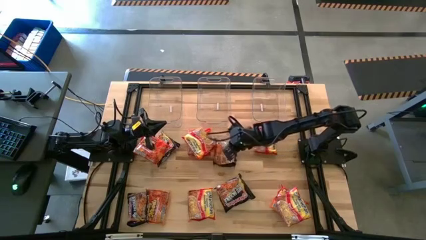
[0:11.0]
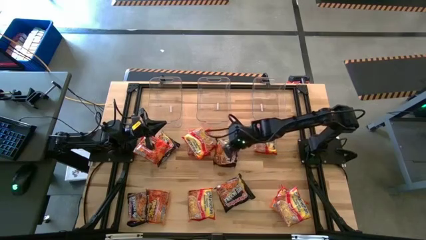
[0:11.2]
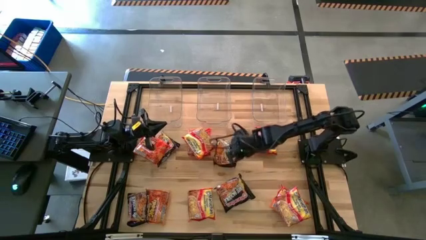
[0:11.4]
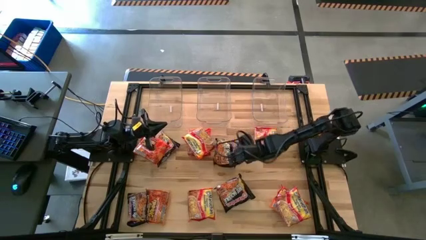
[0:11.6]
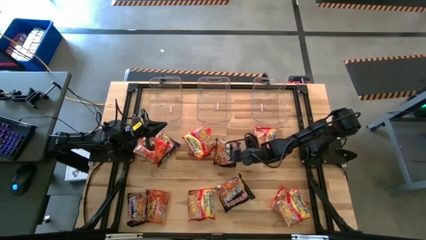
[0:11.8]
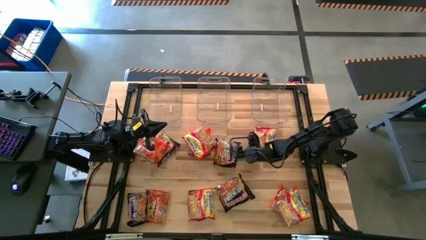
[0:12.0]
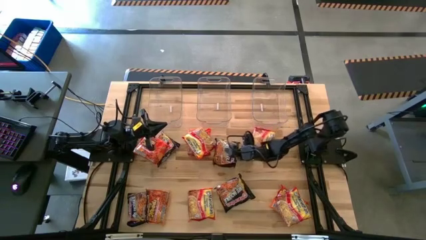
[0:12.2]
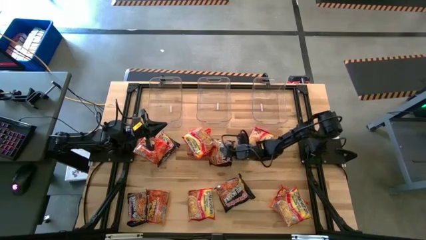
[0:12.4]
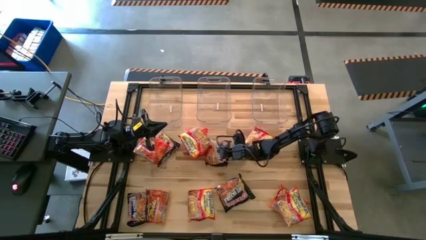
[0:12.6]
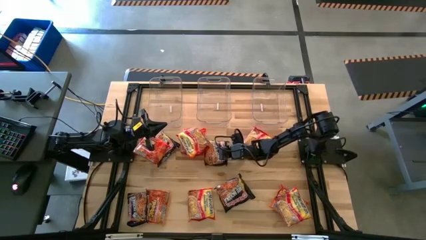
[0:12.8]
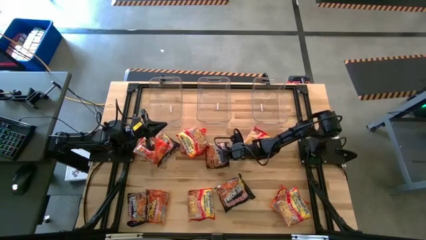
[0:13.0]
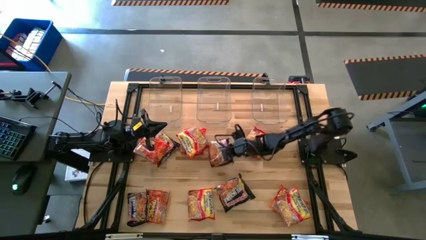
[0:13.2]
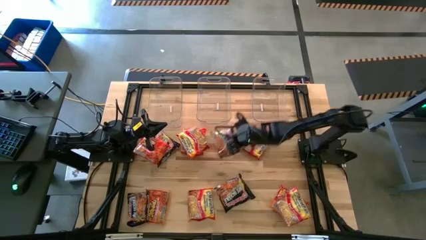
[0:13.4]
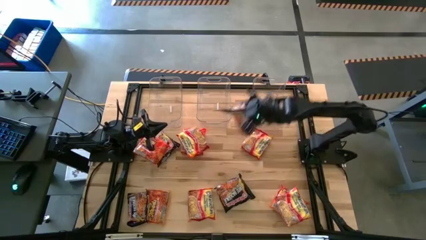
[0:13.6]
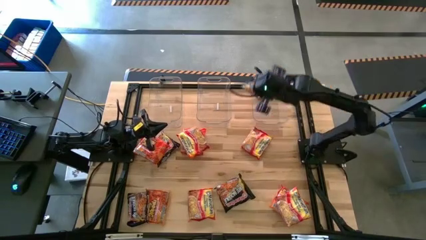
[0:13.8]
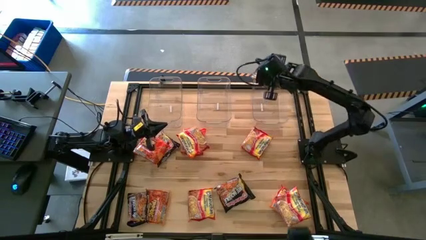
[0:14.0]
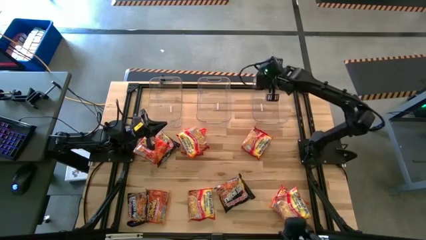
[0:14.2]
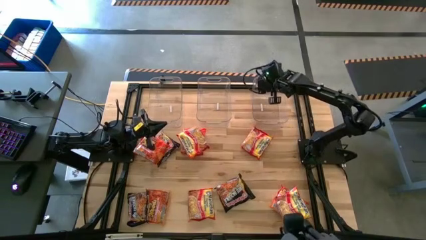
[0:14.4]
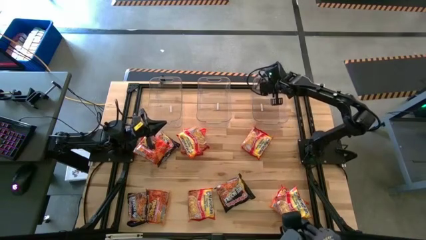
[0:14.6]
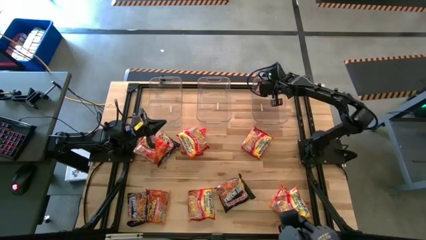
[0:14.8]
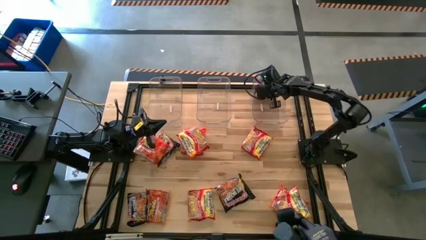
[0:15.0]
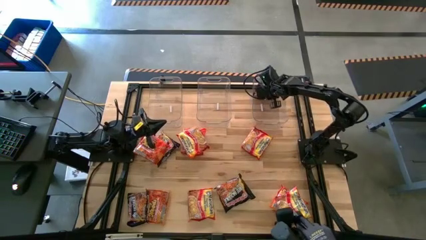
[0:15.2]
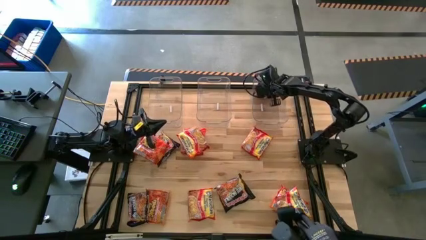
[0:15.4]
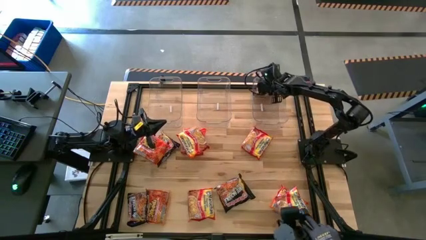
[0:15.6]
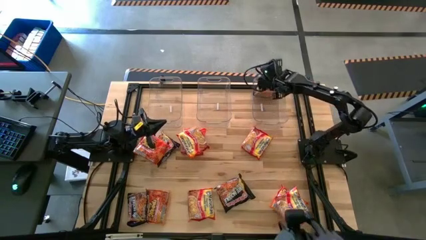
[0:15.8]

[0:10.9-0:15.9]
Task: Sort Maruchan noodles
Put the black noodle packs into the right transparent bin

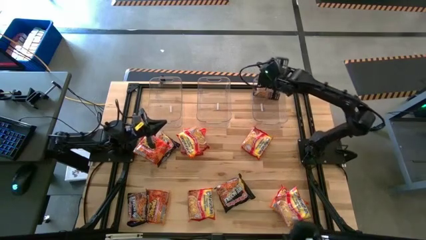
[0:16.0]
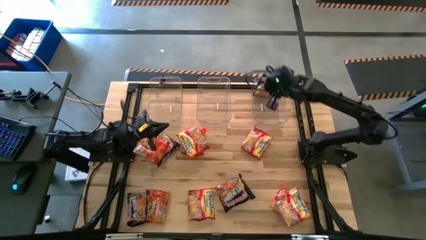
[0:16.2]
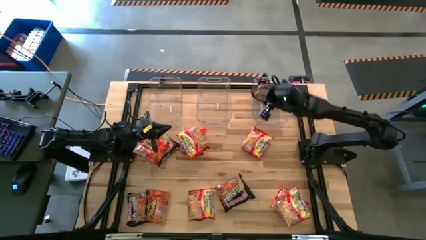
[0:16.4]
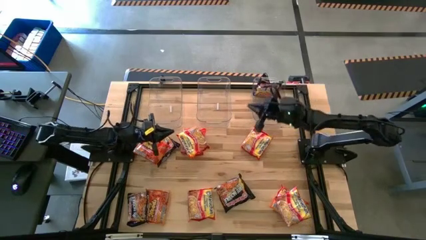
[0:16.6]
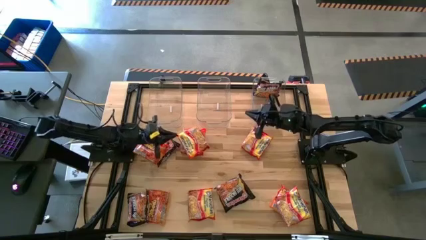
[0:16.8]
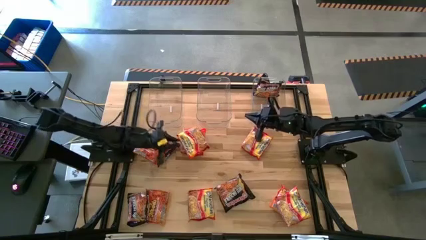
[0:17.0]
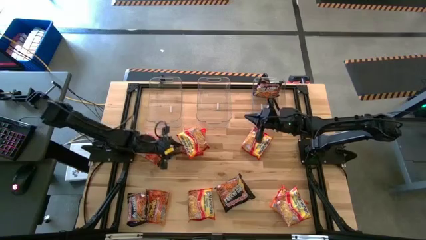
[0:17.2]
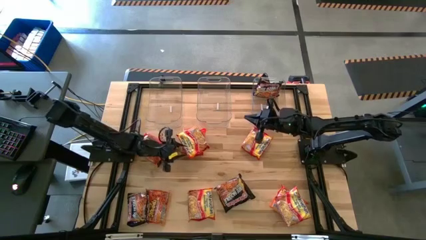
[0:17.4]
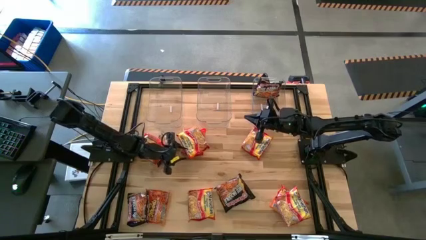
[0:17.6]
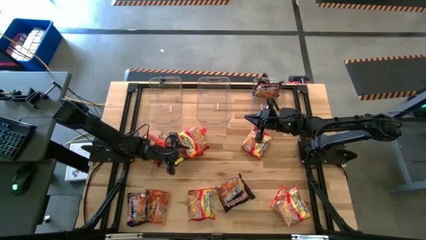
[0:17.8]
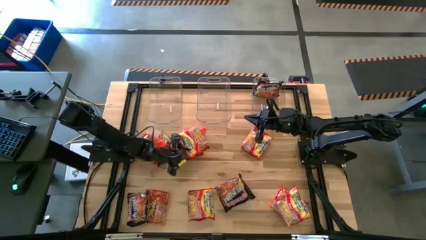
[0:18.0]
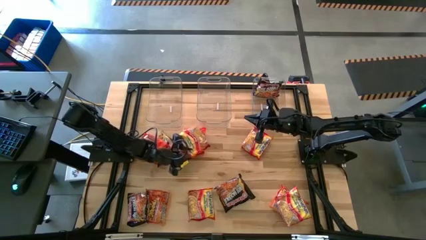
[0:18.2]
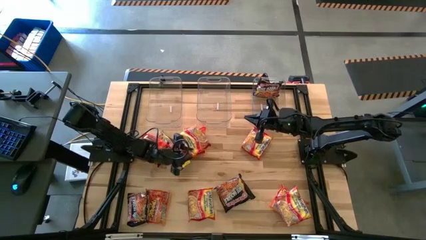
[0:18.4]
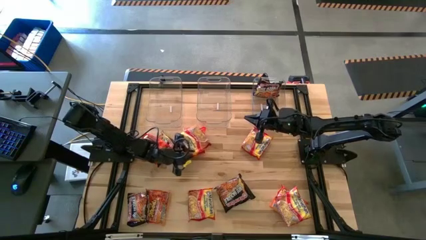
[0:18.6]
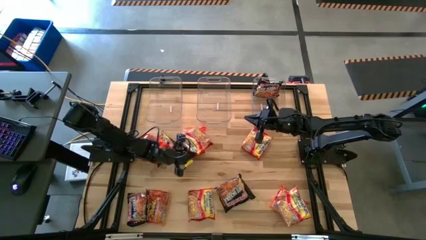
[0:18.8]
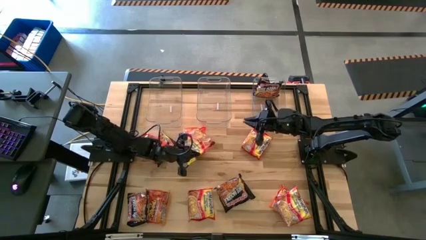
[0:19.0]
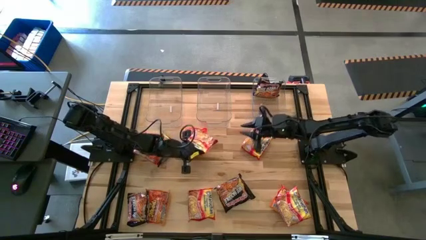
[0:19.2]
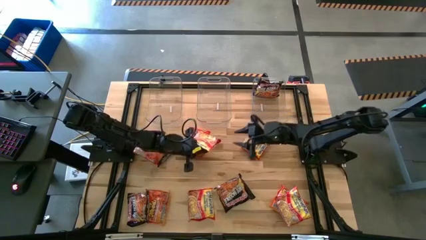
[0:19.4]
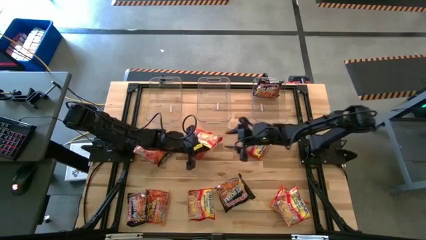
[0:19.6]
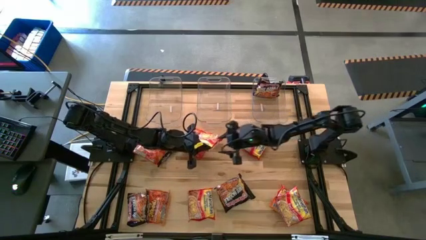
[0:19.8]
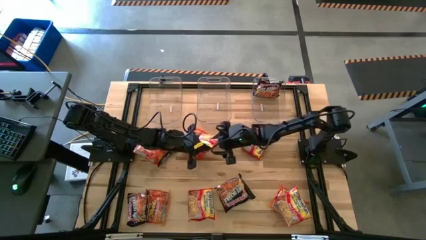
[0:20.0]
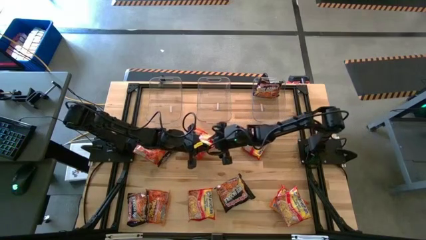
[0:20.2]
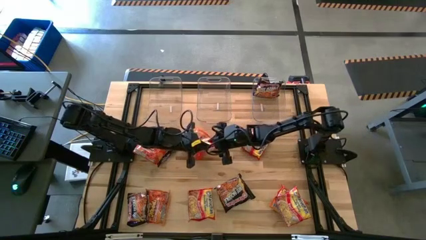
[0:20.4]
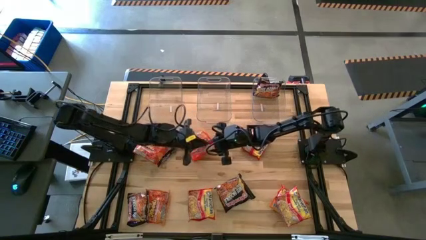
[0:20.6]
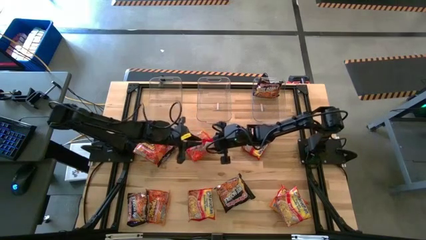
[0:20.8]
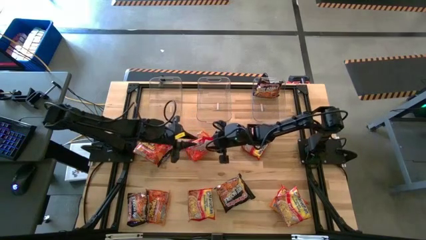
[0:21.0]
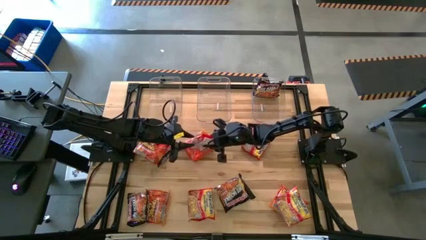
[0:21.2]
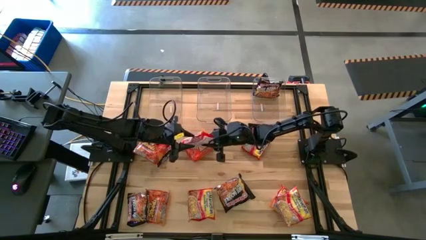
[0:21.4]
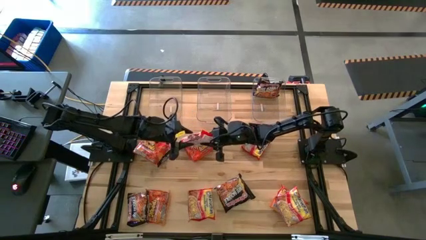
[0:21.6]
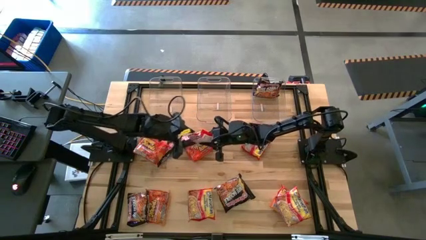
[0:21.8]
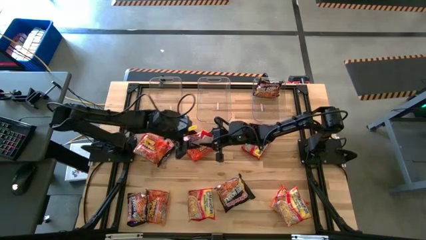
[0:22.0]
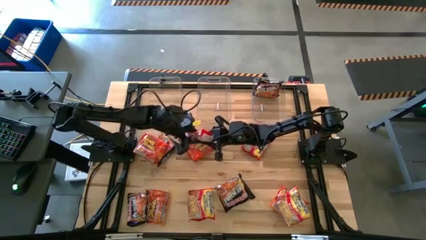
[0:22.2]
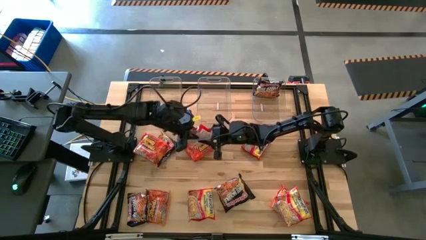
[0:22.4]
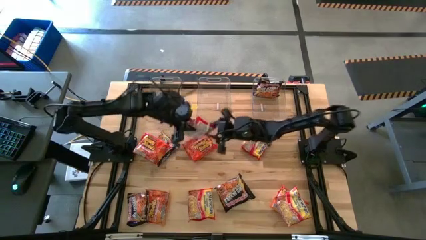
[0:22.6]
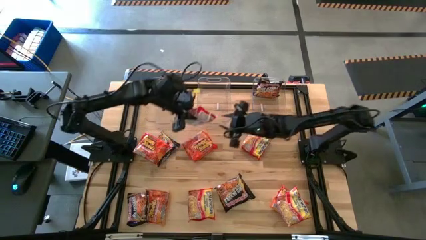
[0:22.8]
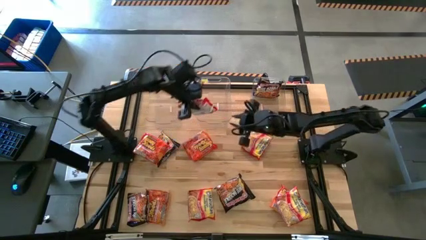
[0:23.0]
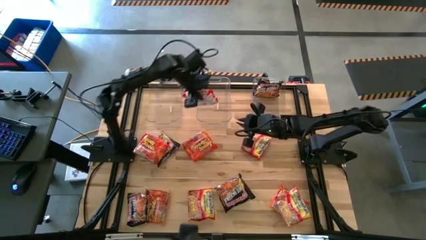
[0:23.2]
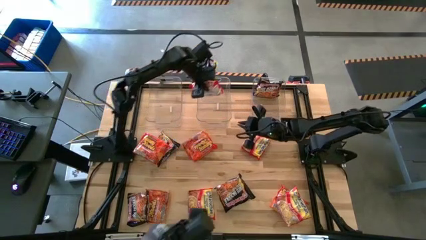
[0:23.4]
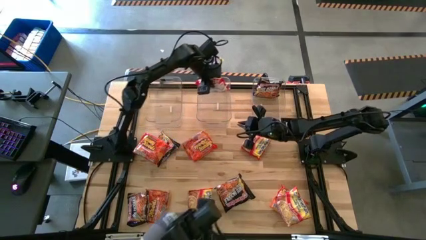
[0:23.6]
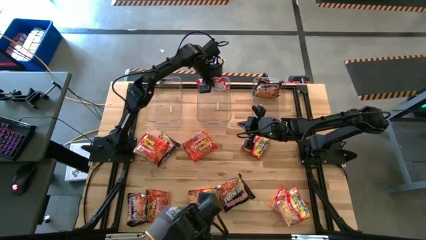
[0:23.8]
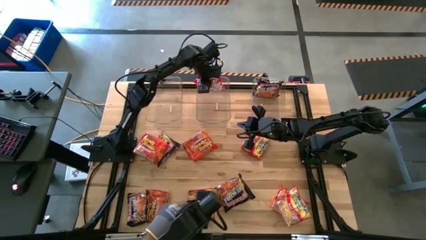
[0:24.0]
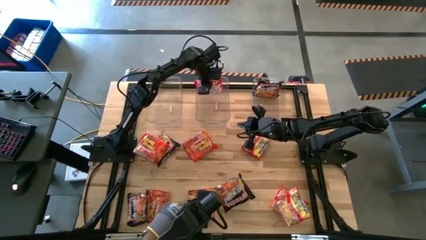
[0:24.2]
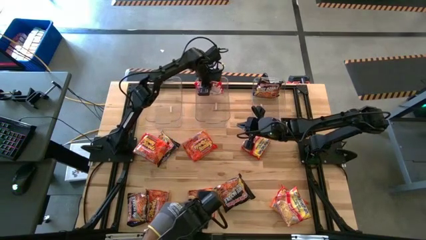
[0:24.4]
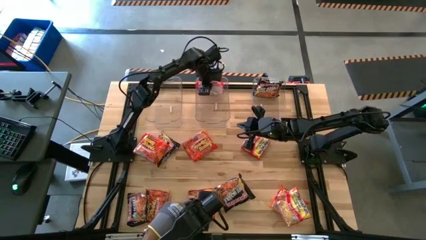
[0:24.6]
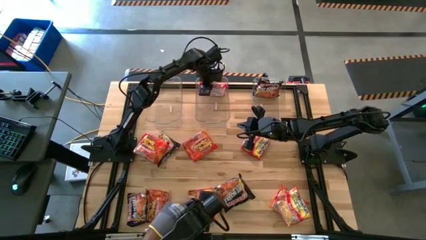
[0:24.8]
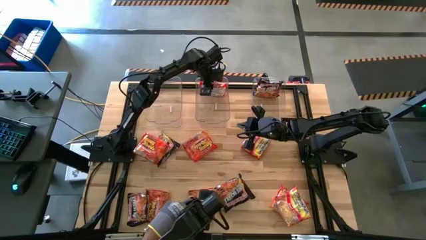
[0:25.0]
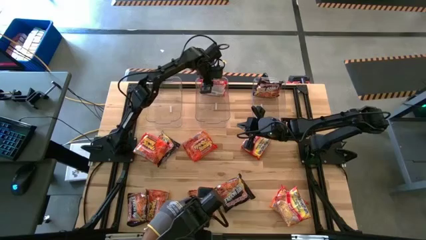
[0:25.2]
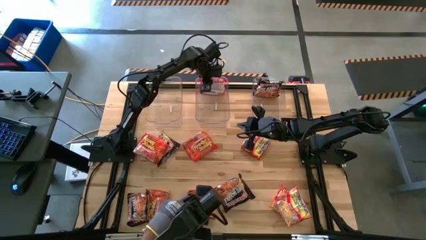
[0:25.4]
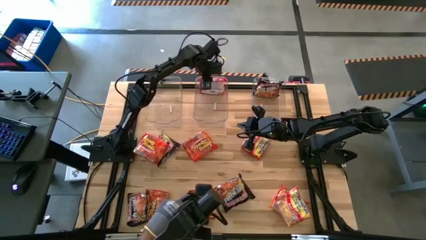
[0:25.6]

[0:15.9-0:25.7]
Put the red noodle pack into the middle transparent bin
